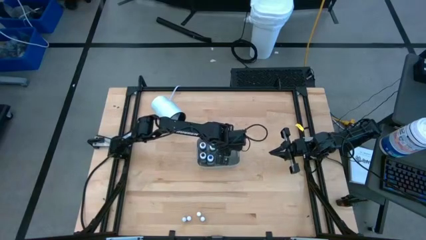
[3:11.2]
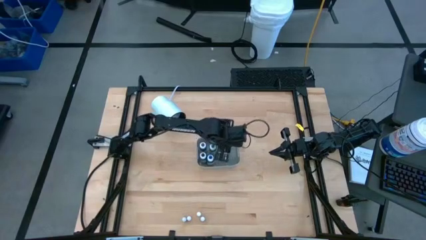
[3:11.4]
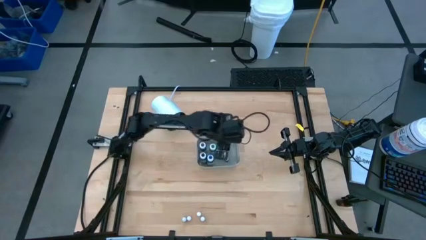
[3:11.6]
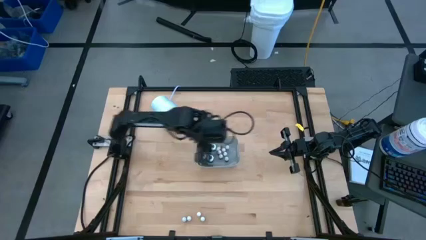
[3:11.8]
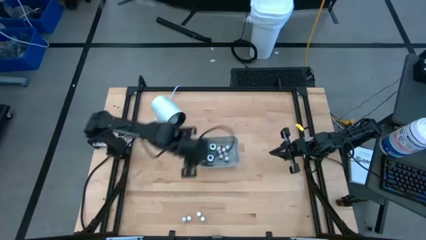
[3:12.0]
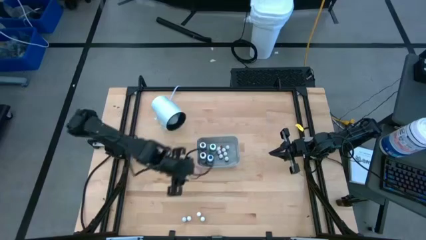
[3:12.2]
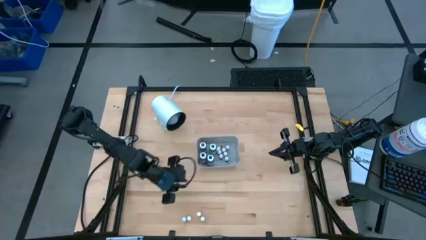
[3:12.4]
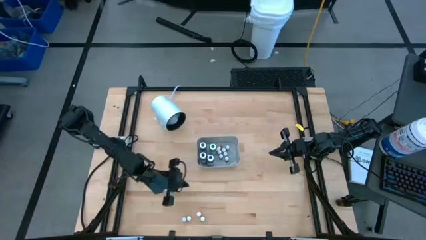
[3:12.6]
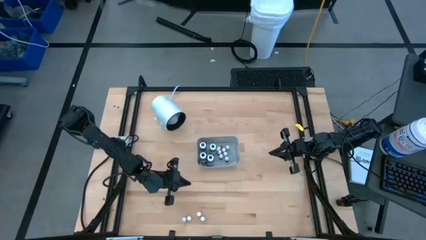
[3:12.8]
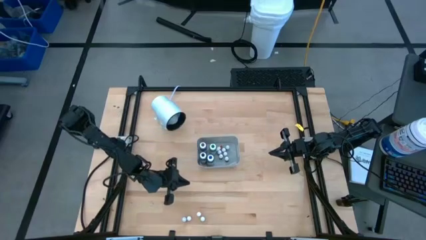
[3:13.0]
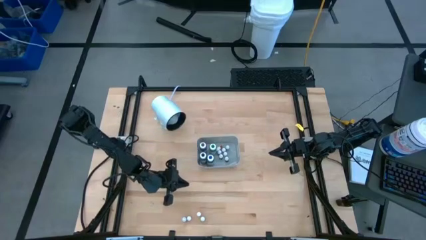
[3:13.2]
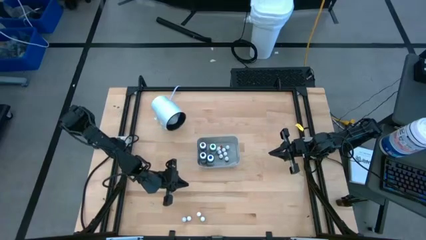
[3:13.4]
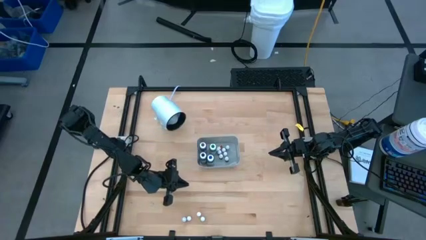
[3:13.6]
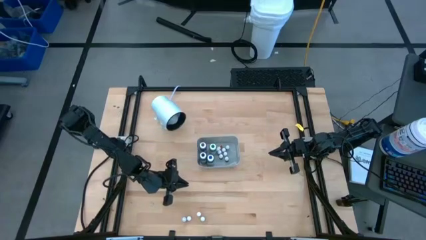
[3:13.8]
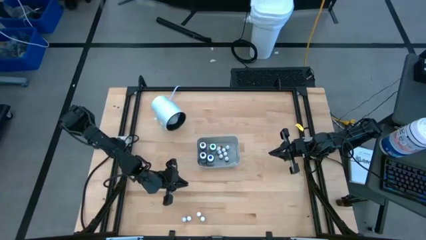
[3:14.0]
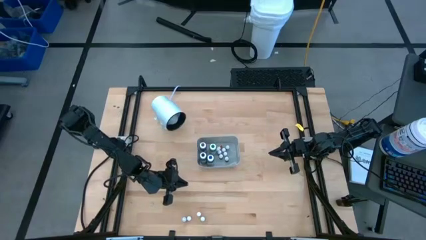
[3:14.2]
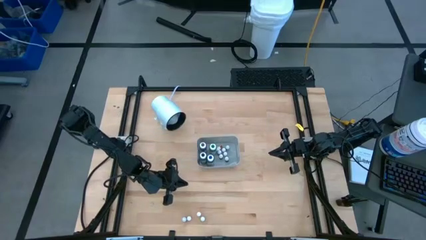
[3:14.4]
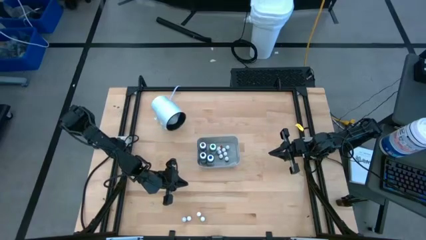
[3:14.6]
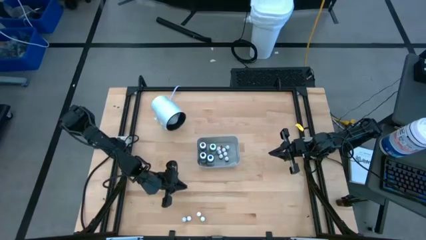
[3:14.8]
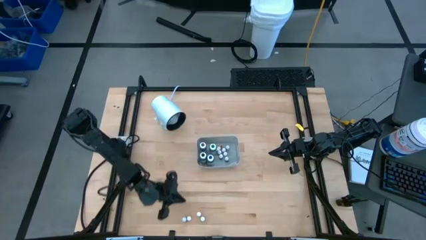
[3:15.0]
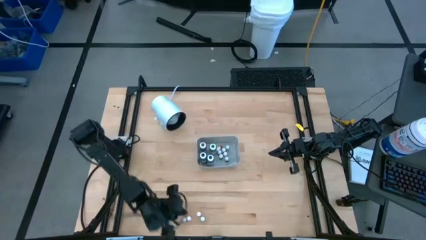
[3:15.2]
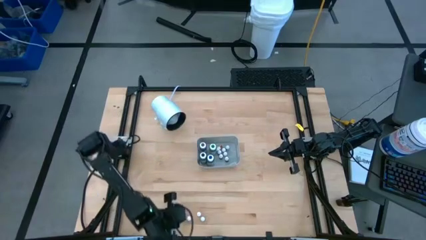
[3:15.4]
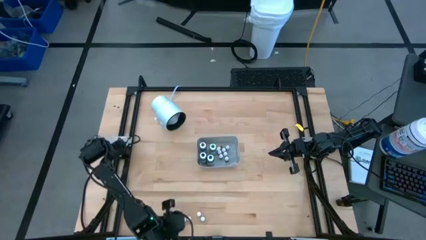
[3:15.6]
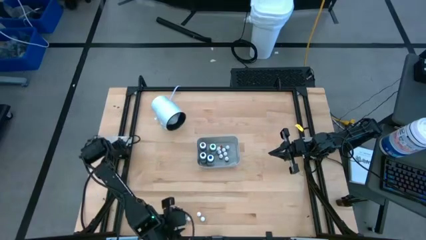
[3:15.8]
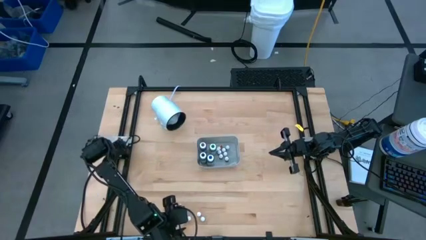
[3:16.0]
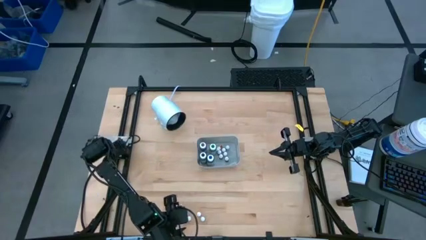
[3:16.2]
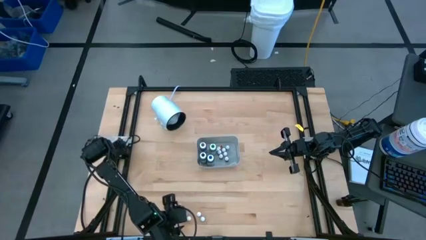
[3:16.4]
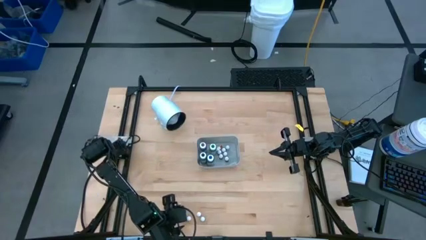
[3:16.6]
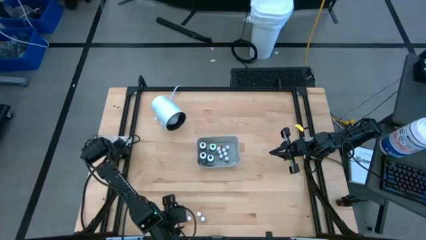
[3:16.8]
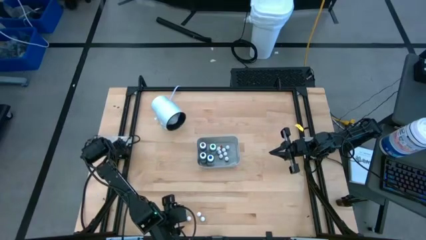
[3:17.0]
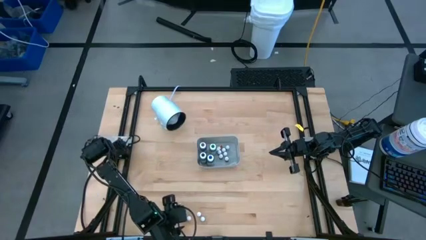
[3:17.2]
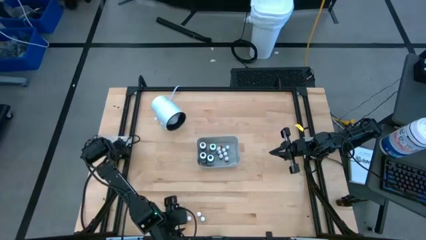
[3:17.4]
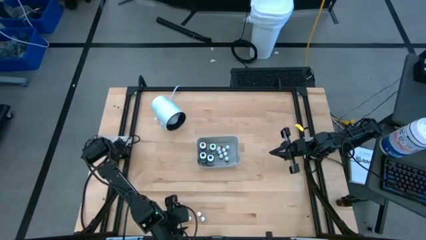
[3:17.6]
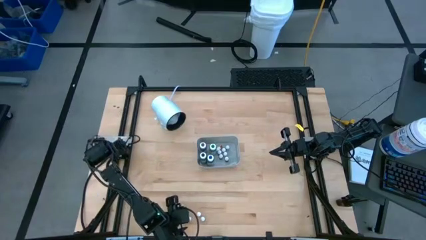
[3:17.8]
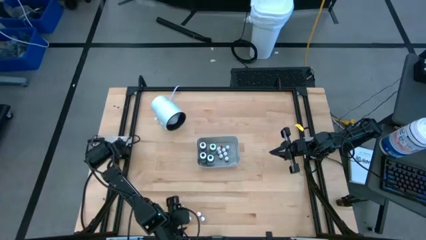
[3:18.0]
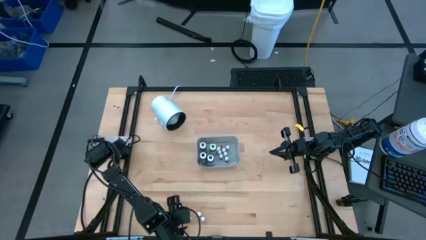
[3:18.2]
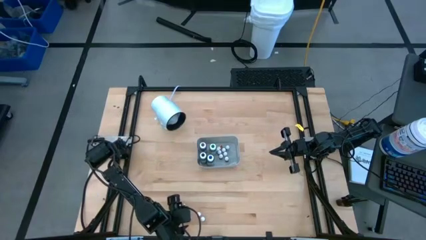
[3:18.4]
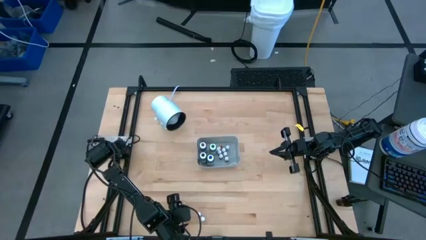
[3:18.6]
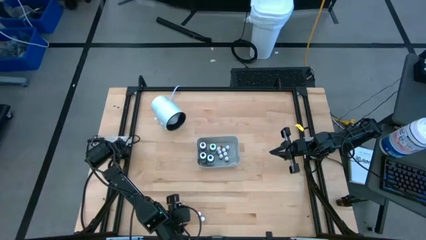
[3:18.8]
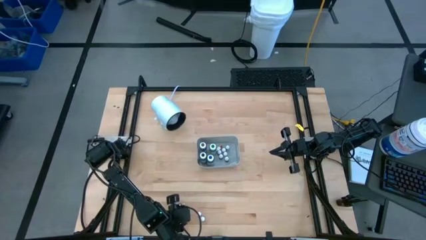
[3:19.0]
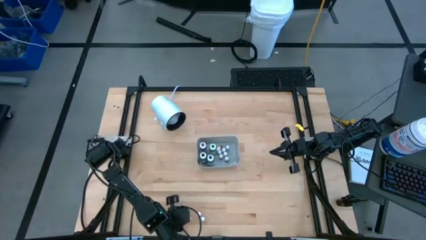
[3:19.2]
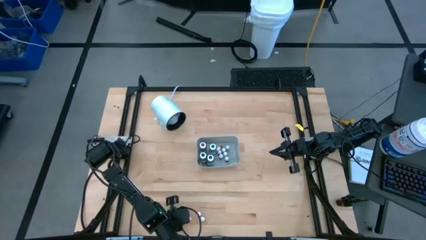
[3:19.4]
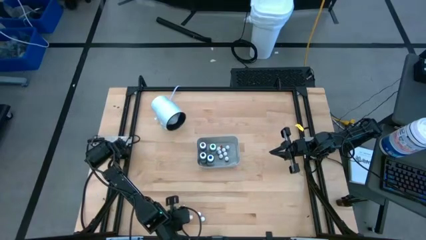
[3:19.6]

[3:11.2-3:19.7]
Task: Pick & Place food coloring
Put the small blue food coloring bottle into the gray bin

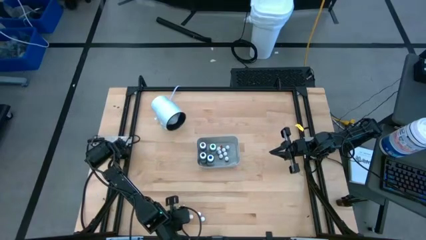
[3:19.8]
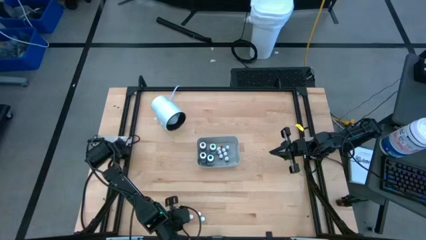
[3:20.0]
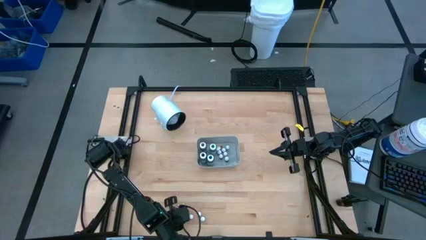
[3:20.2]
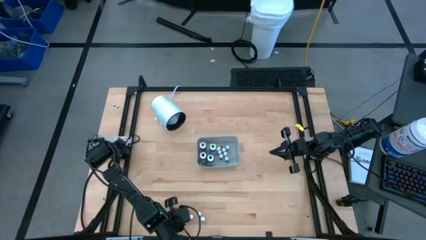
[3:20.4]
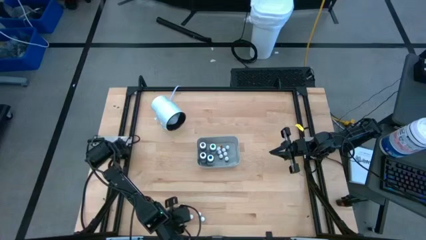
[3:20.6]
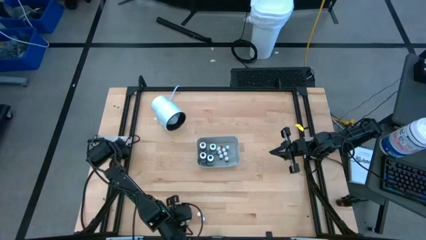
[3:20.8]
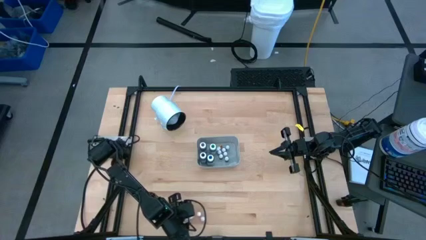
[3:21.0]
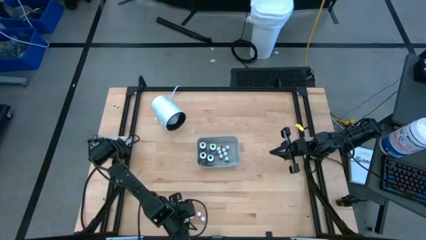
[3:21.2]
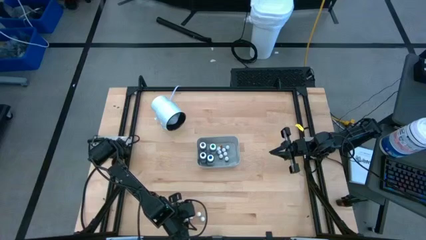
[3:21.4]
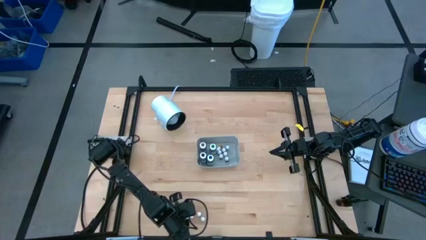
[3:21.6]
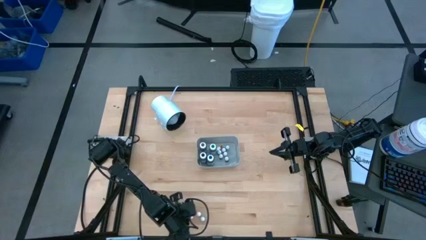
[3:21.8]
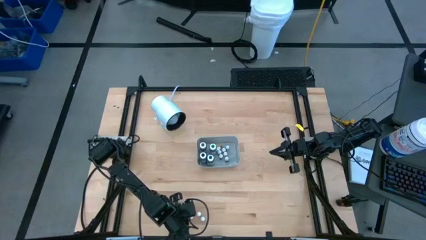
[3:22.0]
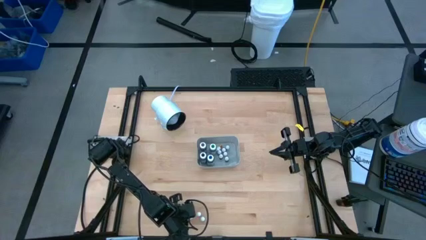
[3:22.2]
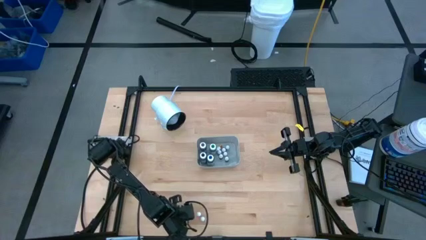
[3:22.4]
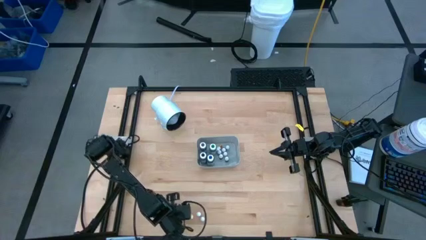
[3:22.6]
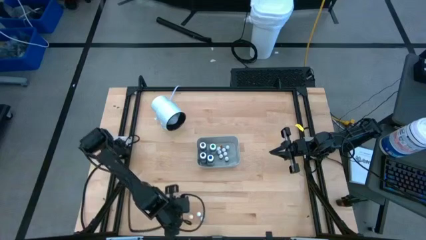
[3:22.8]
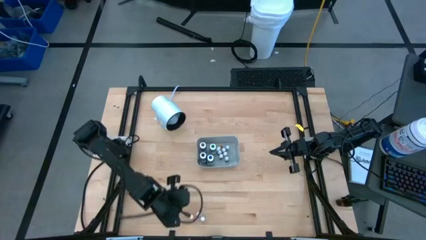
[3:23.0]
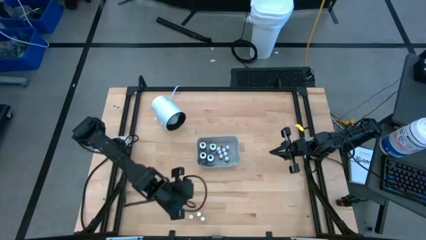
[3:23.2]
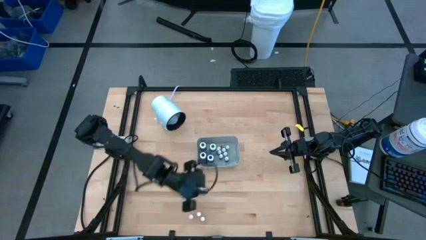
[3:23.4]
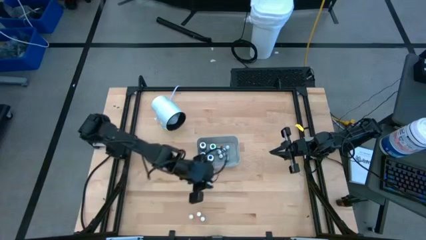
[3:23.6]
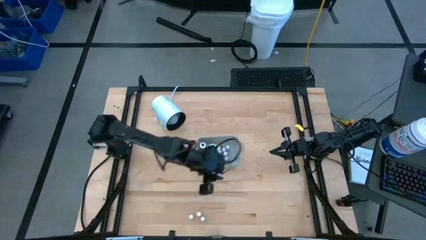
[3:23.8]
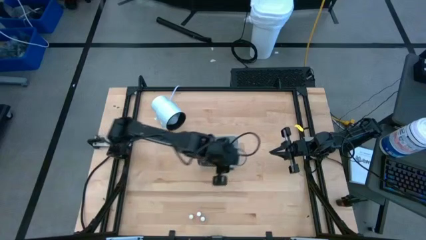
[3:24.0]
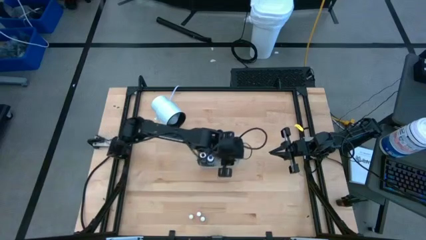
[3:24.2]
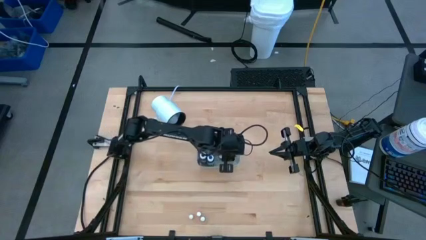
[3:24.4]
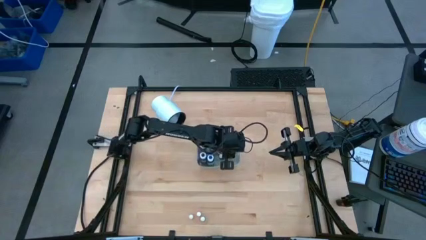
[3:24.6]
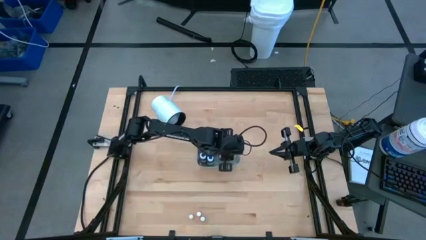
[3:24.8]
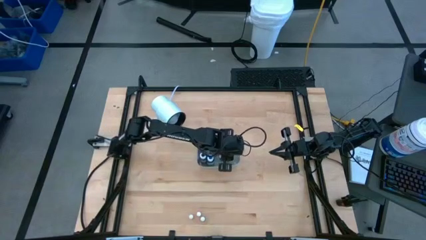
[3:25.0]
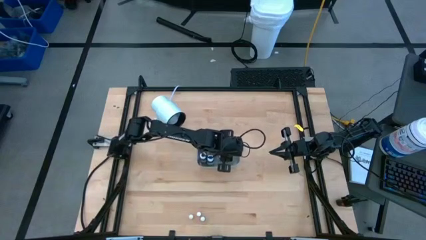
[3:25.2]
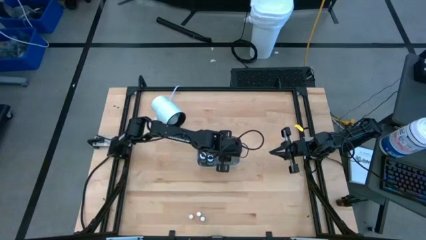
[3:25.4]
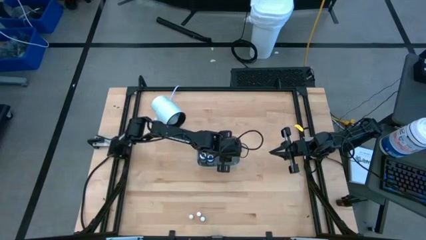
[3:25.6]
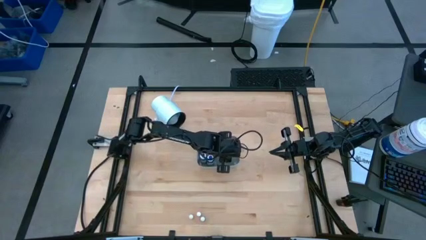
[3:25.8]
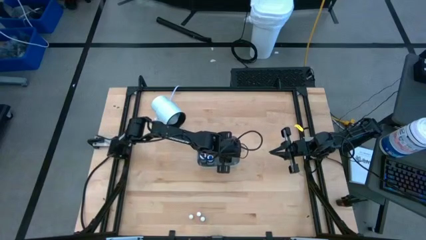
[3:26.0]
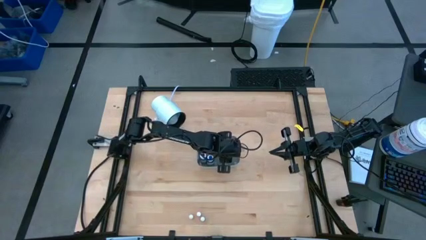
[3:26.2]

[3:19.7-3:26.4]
Put the small blue food coloring bottle into the gray bin
